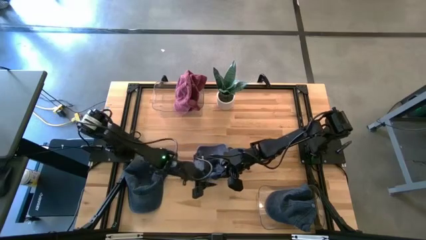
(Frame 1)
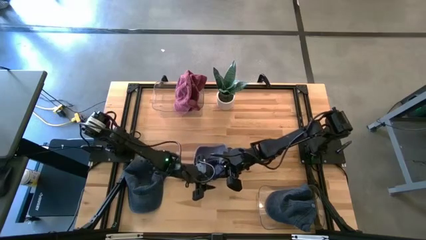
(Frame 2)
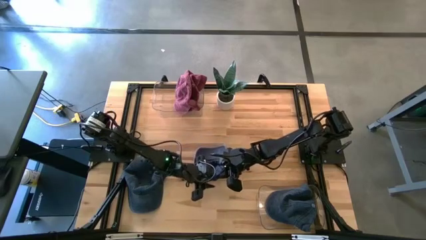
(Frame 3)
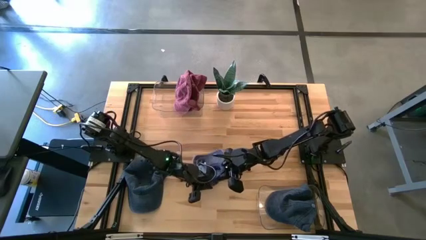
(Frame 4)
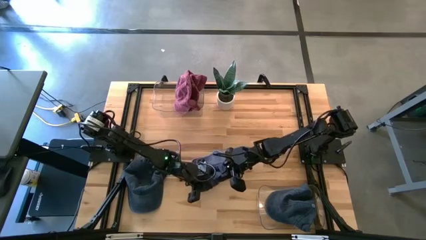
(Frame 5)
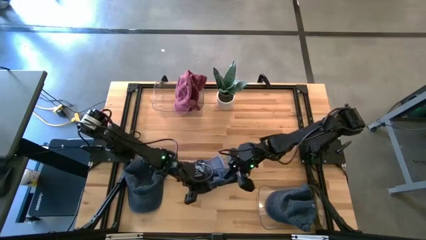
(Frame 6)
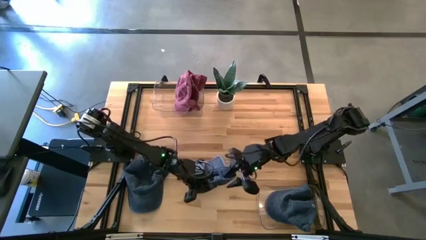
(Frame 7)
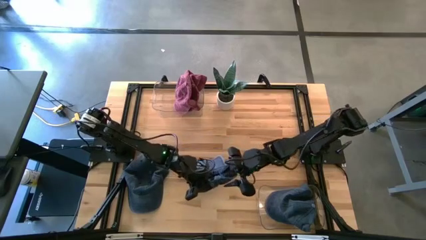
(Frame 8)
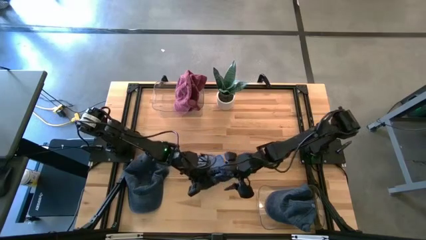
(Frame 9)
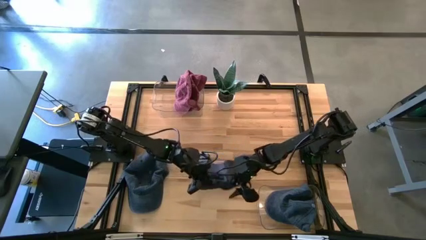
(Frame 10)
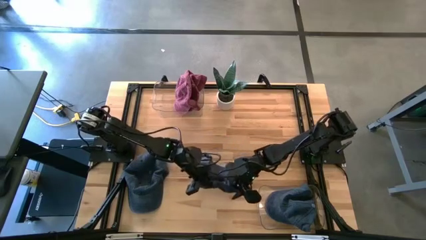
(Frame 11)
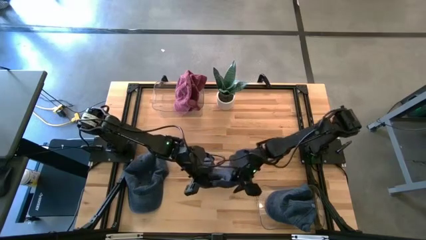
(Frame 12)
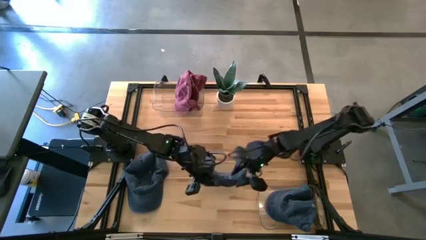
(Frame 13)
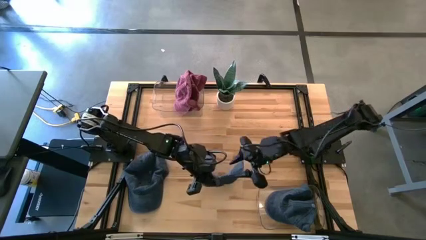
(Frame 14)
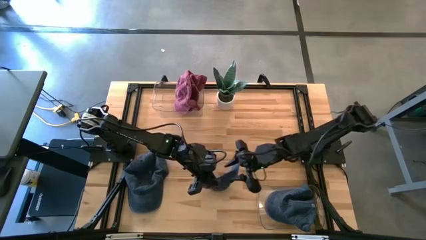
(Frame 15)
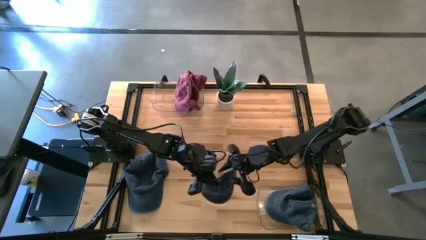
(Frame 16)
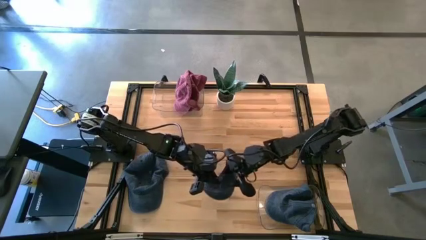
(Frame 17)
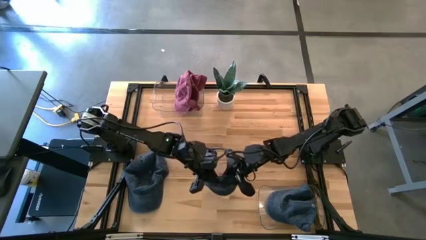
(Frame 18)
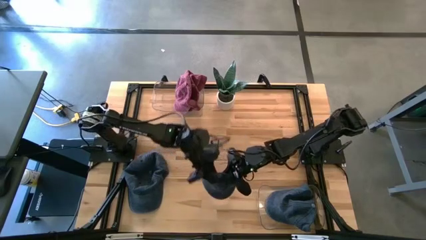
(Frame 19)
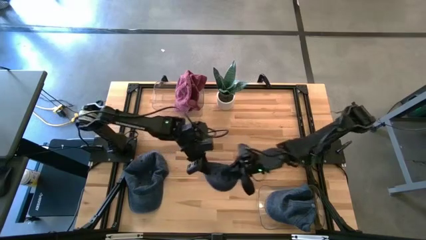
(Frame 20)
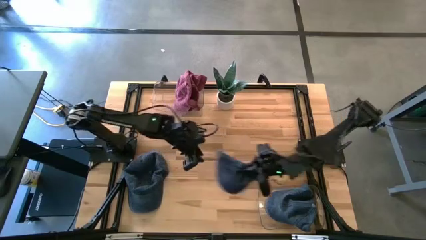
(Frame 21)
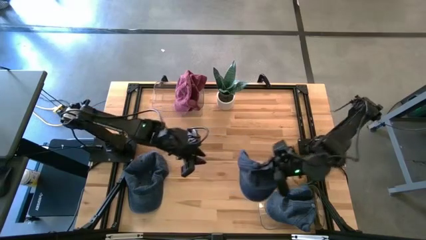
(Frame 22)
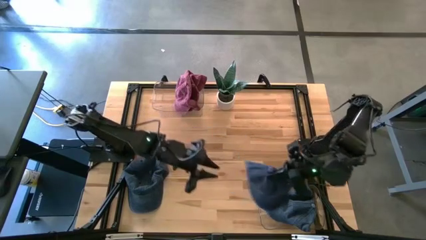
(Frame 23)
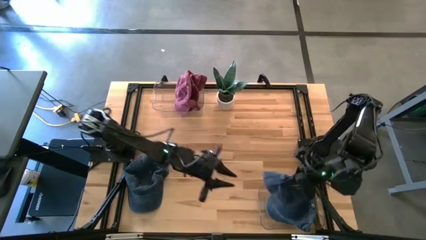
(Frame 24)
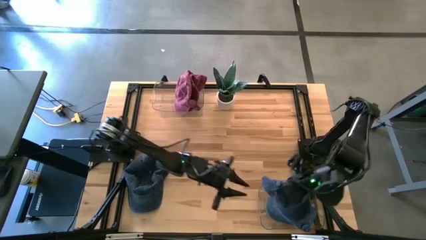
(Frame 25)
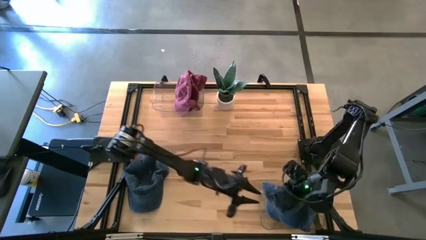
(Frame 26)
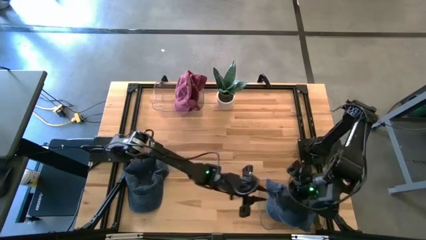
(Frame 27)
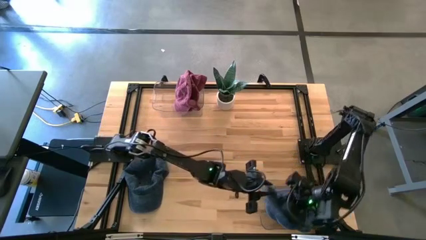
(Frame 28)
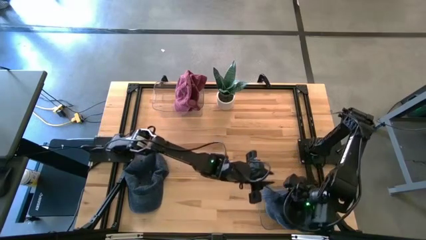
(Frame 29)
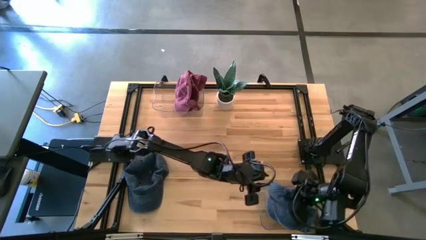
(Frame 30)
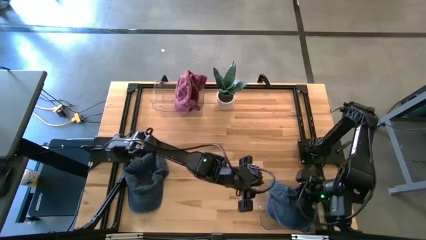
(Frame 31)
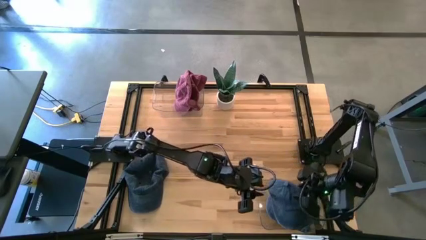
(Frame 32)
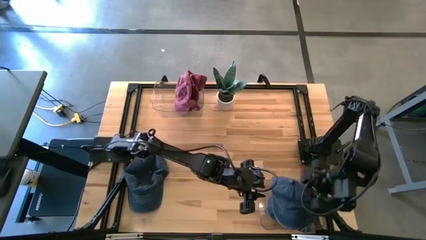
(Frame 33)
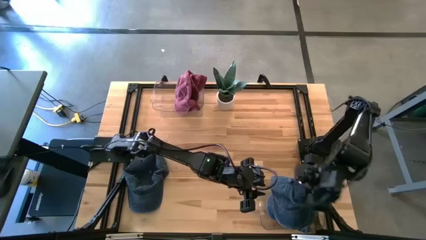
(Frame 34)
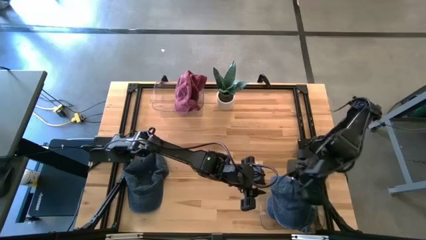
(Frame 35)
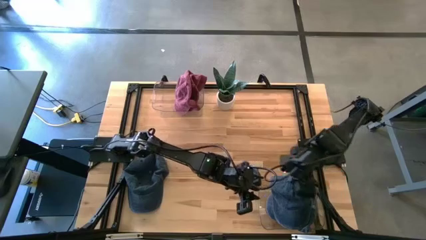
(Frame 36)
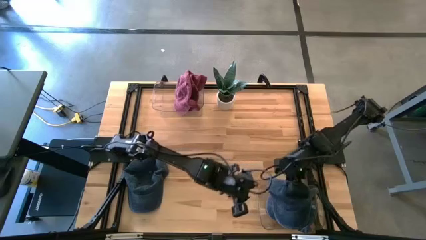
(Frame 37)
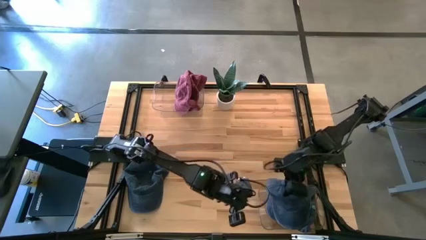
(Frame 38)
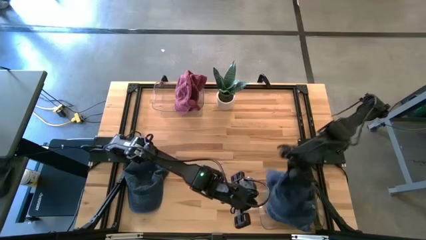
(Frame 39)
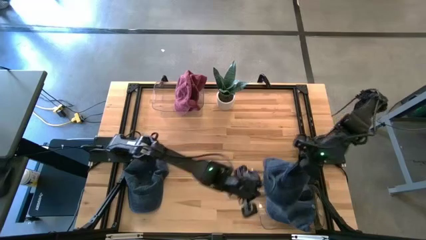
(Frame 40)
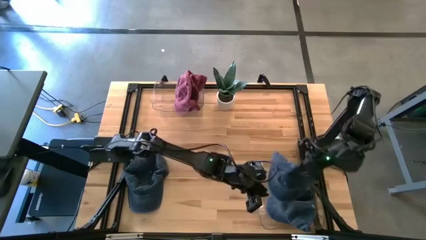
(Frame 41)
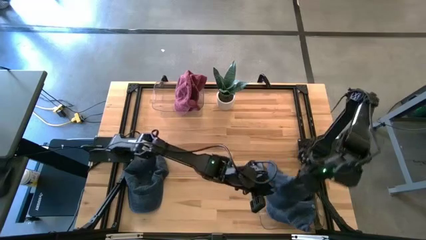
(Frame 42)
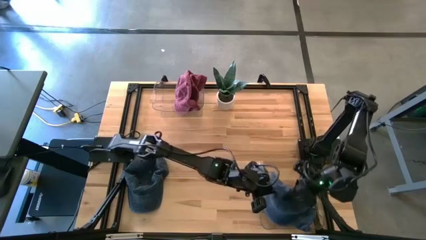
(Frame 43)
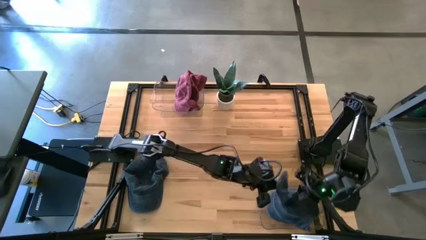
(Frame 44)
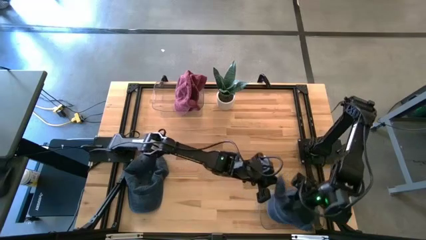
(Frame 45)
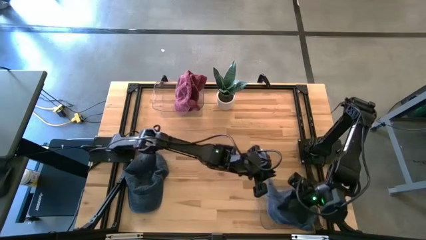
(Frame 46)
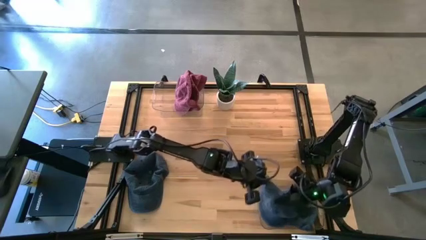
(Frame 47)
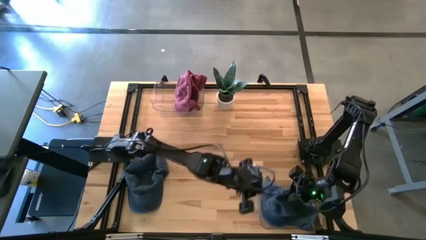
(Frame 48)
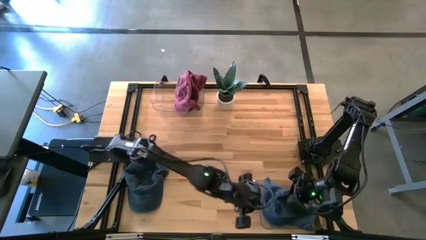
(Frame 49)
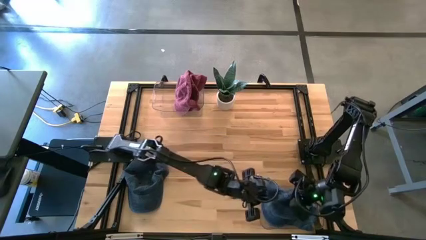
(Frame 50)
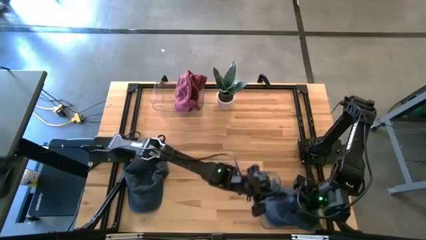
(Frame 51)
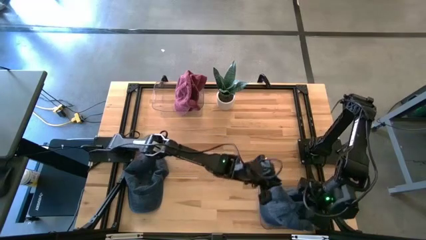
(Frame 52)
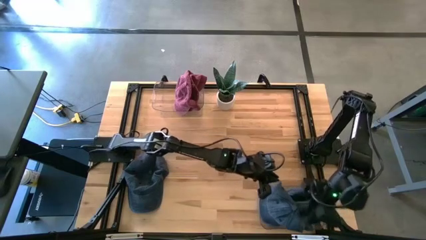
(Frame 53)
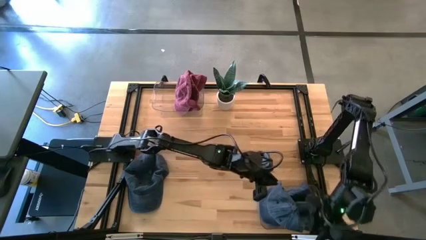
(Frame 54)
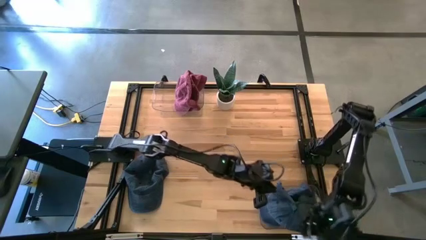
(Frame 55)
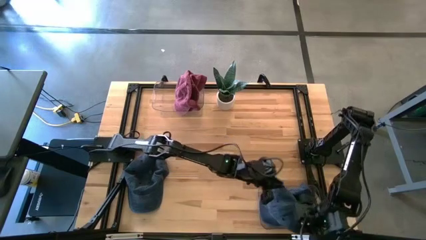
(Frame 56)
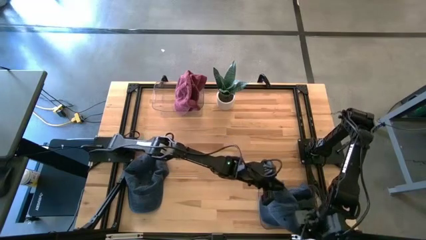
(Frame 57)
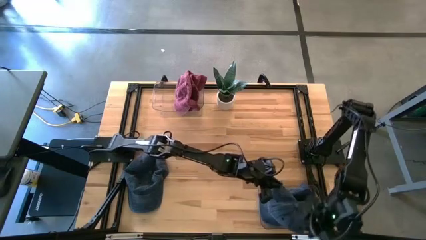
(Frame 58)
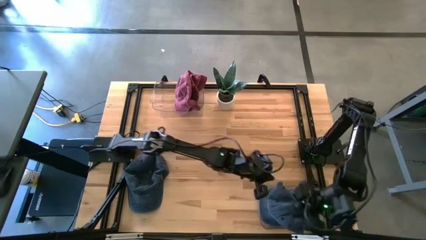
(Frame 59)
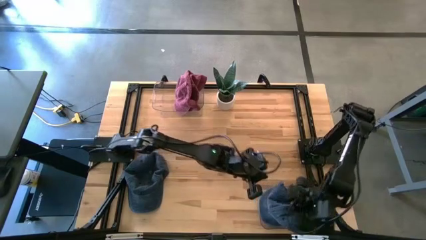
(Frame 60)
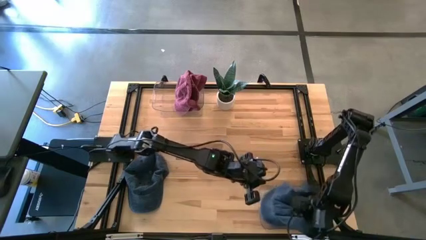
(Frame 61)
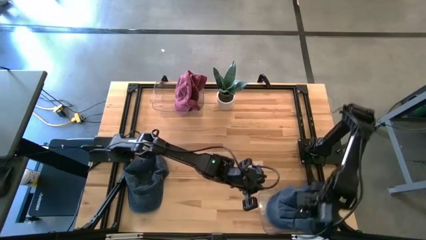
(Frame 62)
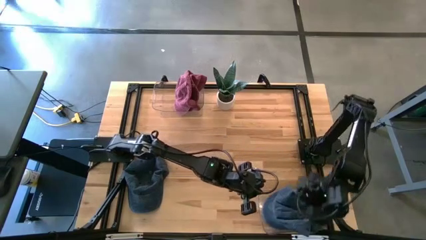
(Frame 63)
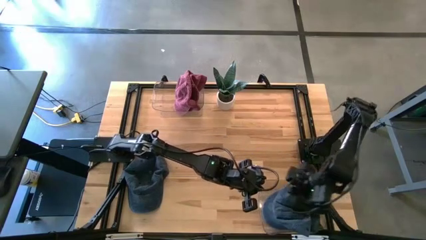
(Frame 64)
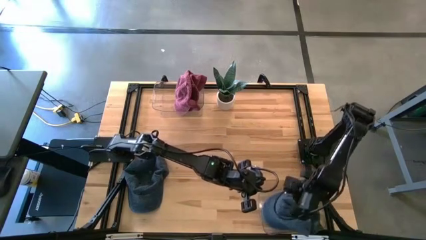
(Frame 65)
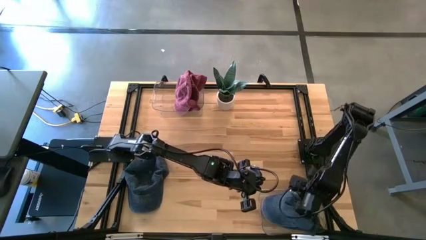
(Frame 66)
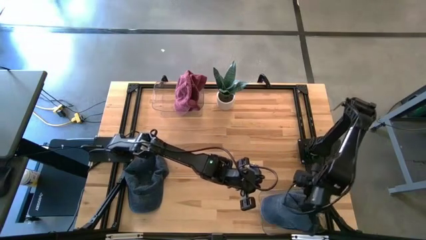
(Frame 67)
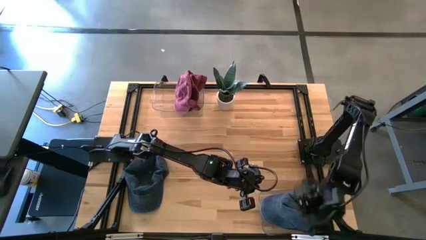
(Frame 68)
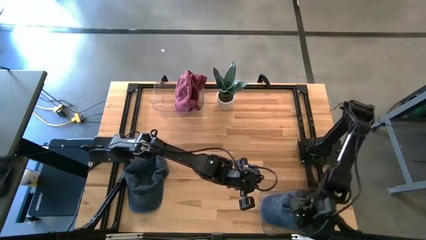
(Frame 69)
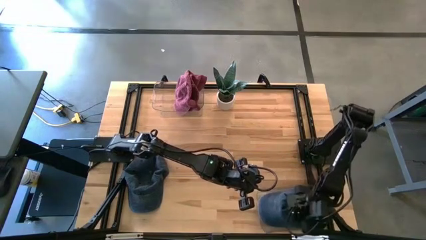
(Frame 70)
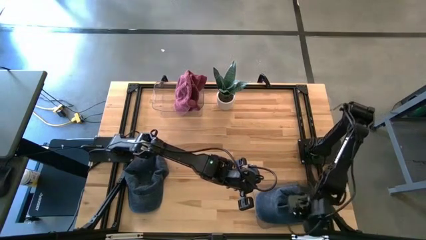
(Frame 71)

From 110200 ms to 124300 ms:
Task: Pick & Place hat
Put the top blue cap into the bottom transparent bin

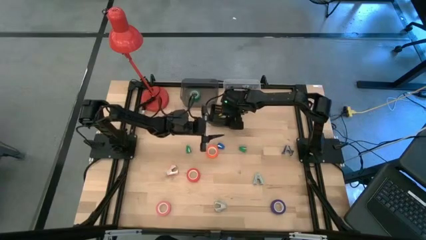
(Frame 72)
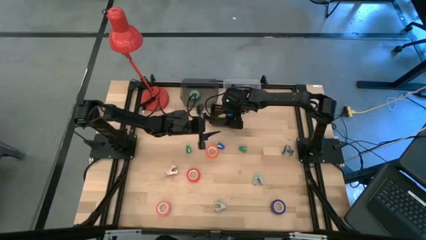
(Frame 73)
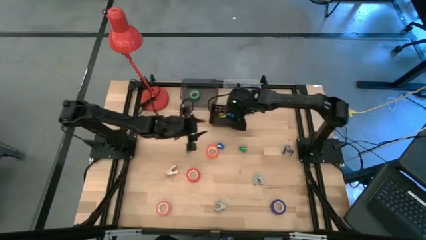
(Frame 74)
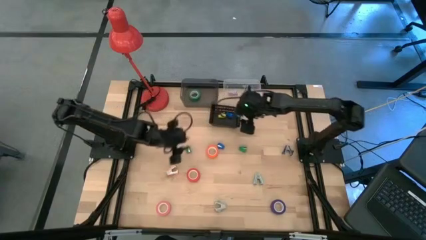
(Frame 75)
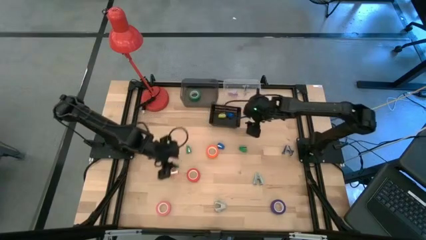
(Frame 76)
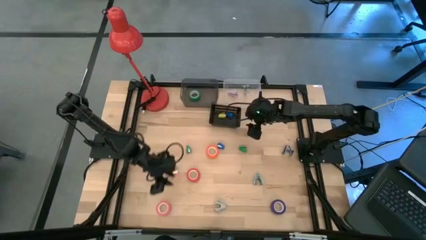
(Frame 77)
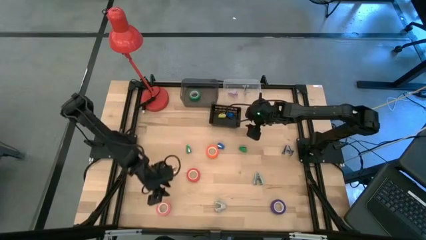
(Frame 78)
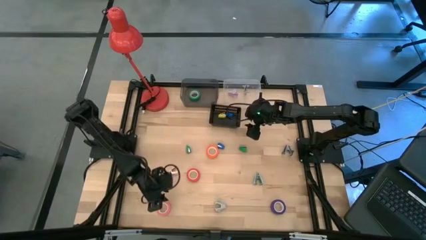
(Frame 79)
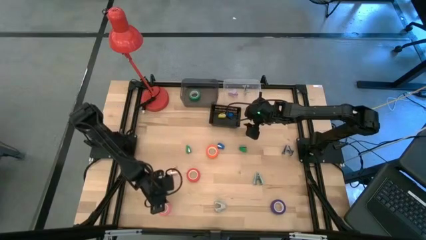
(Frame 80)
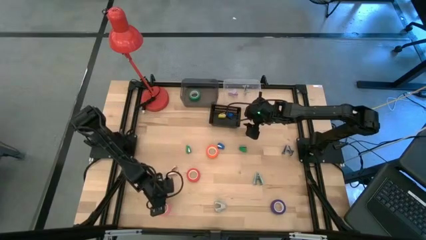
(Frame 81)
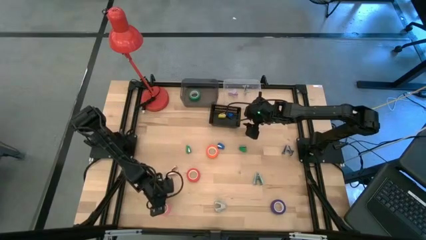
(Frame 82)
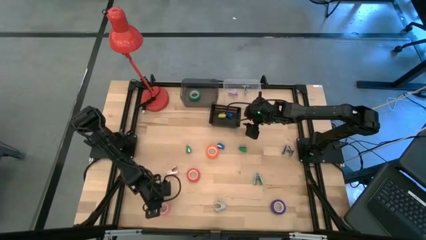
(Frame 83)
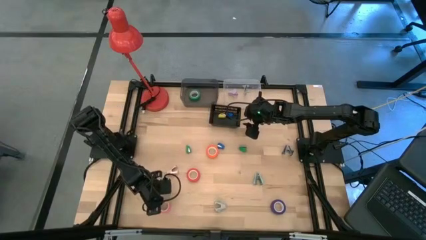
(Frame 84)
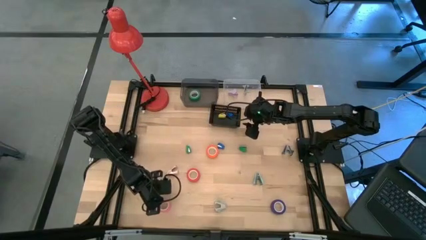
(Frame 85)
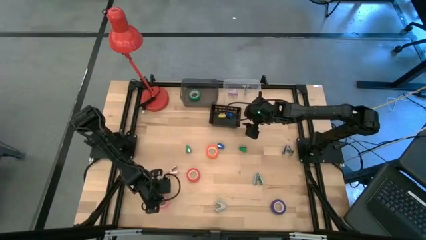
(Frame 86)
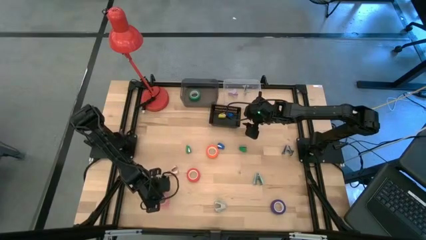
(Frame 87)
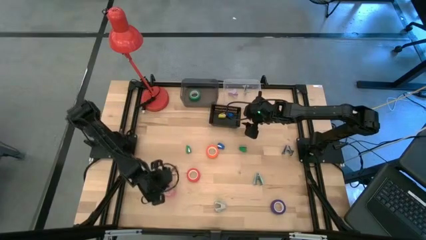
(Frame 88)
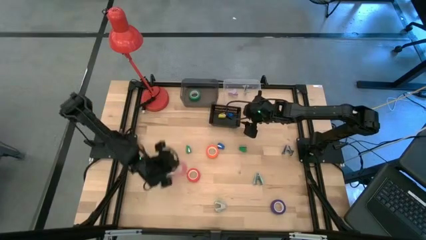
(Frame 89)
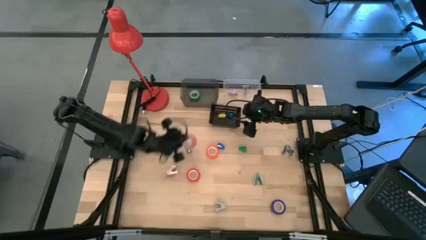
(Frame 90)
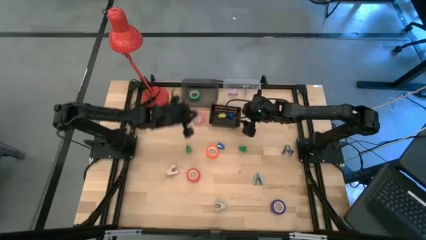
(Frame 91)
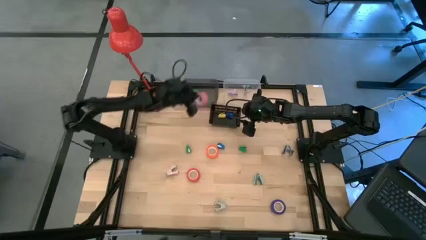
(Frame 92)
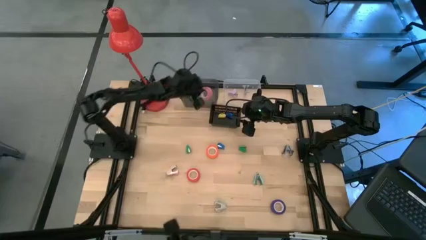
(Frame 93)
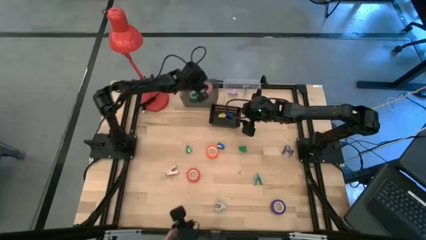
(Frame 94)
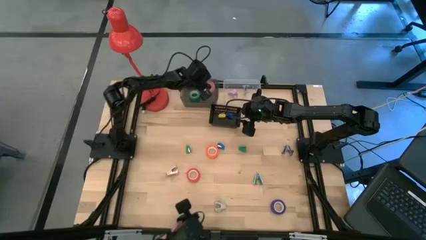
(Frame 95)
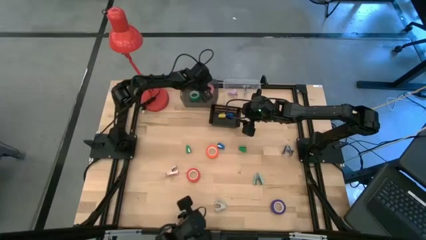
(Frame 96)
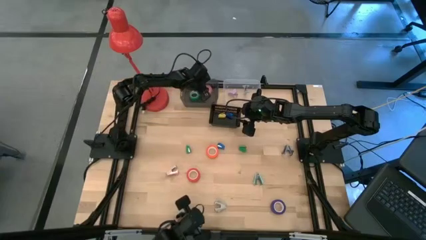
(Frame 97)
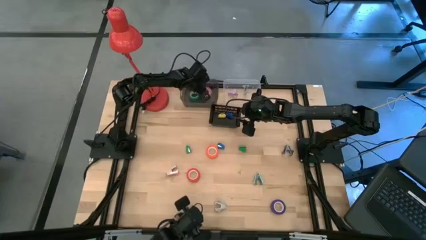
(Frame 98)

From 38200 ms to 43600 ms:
Task: Pick and place Stapler, Stapler remover, tape
Put the pink tape into the black transparent bin
